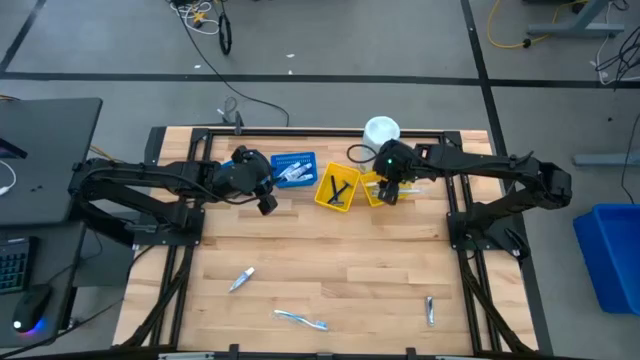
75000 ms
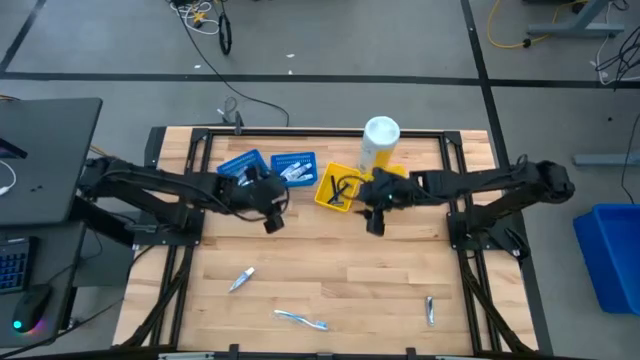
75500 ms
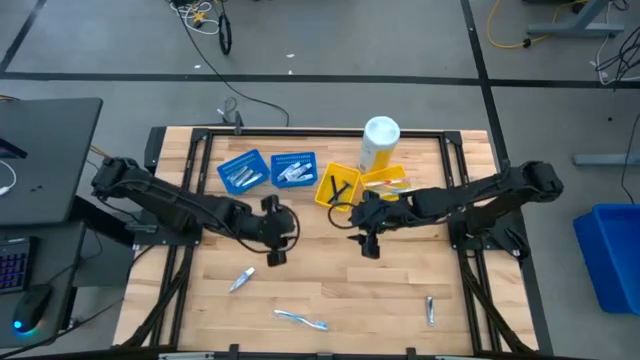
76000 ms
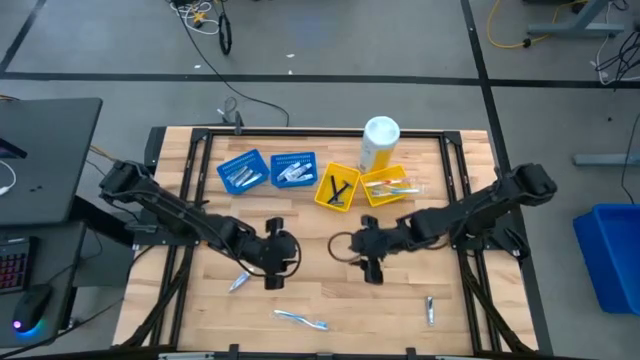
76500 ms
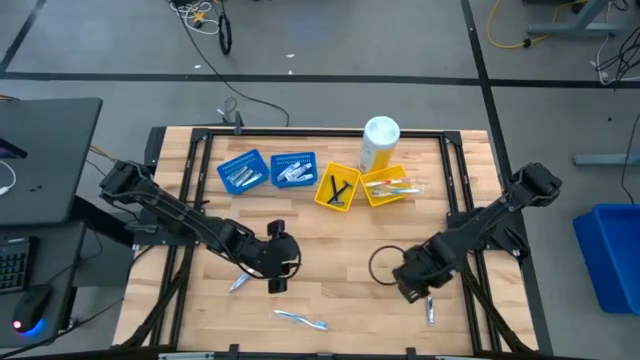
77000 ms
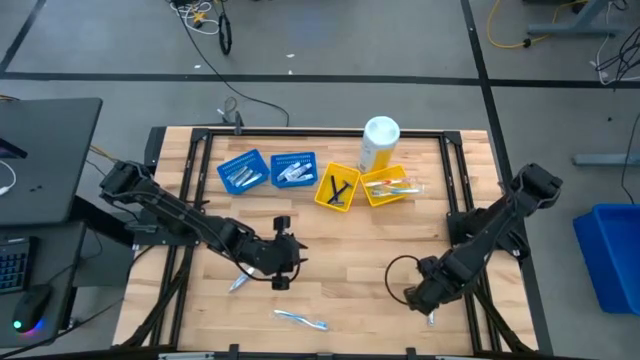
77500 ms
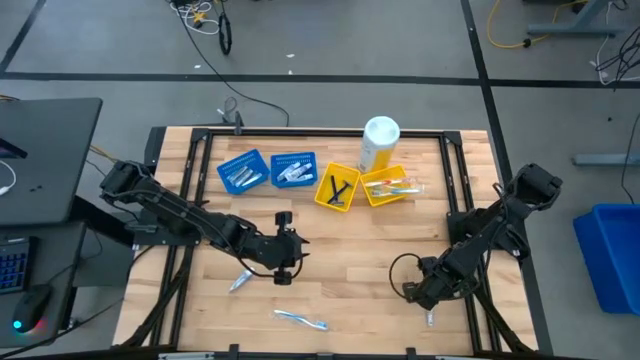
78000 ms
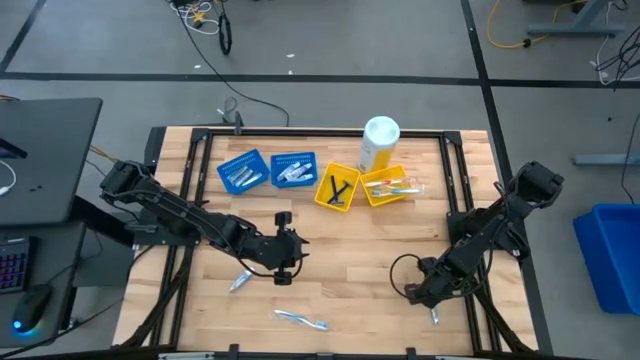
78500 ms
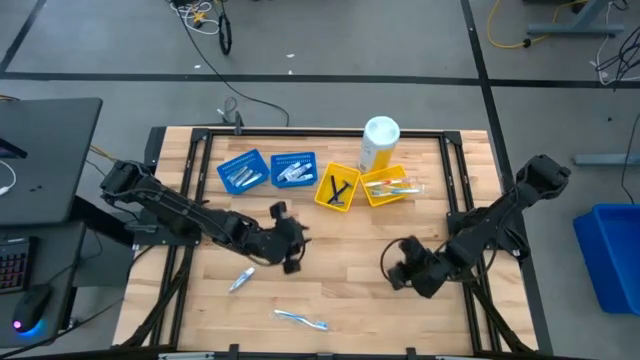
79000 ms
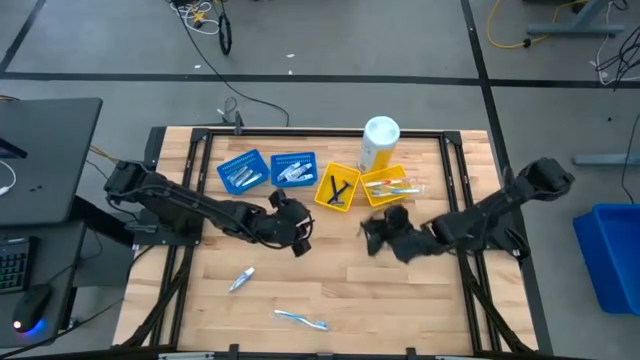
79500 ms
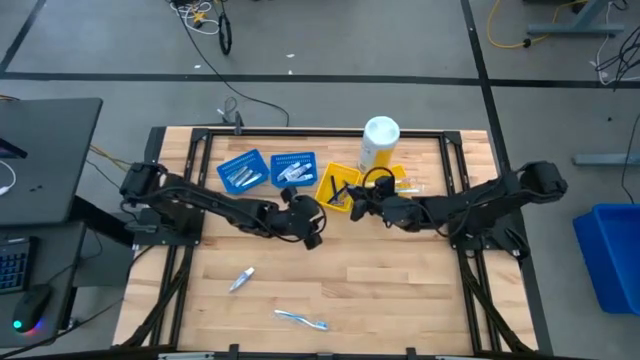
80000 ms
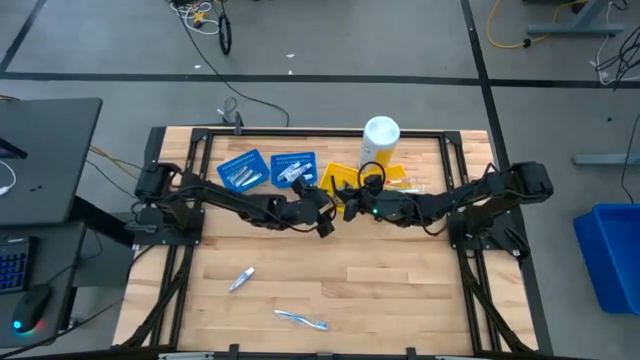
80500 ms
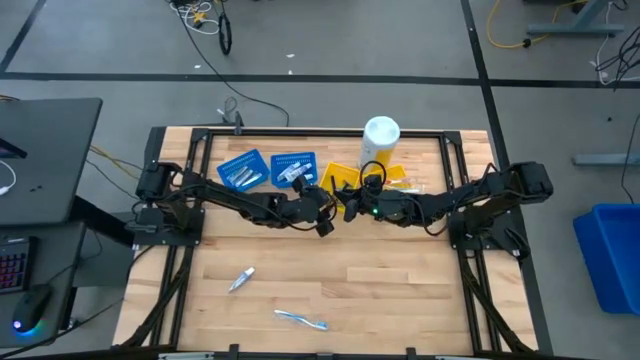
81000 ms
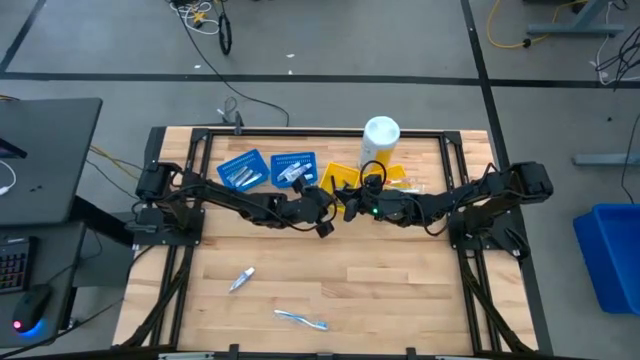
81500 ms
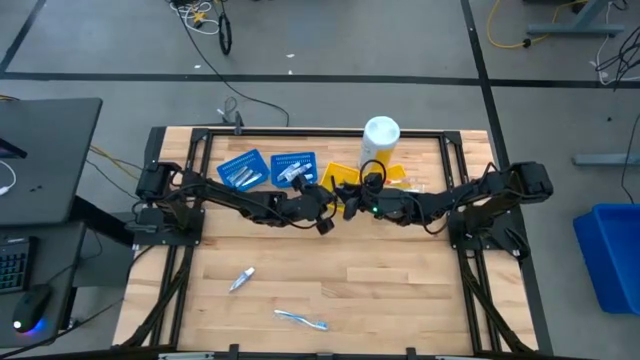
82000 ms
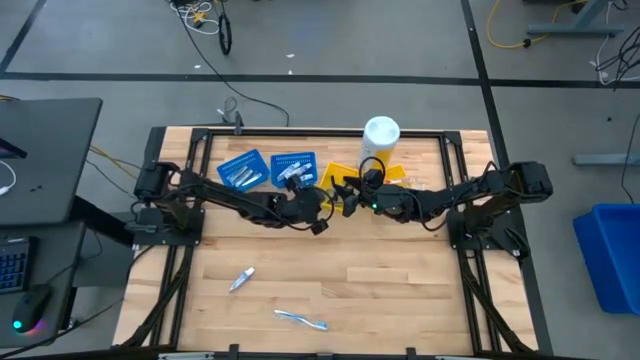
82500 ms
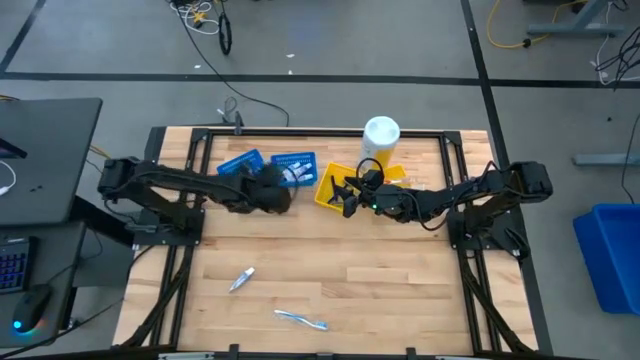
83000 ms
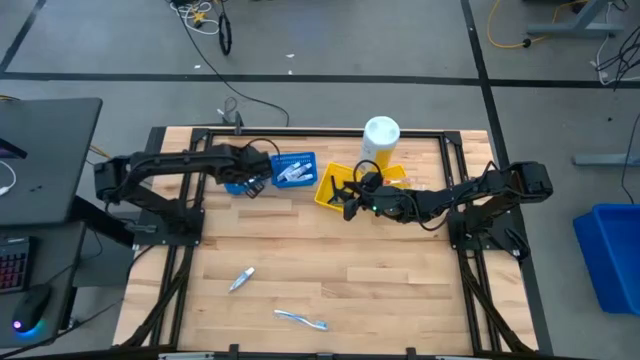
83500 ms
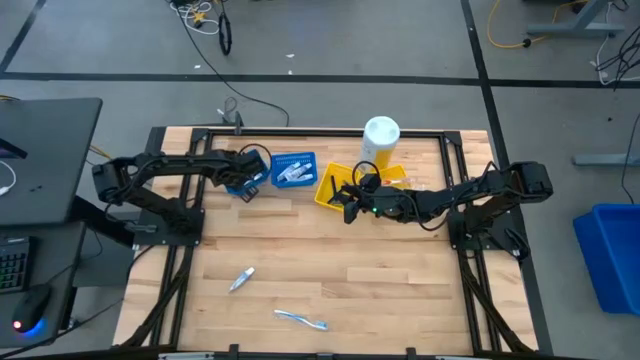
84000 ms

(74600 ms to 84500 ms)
Task: Pick & Place Travel size toiletries
Put the silver nail cutter into the left blue bin

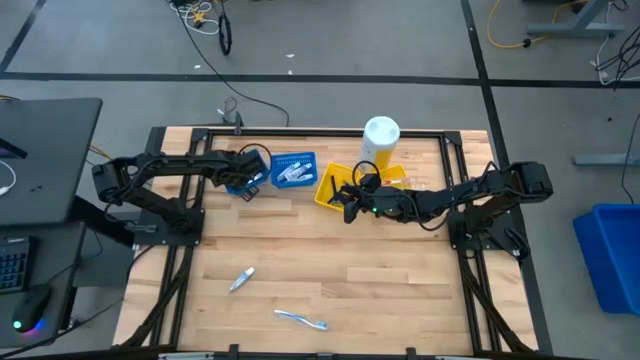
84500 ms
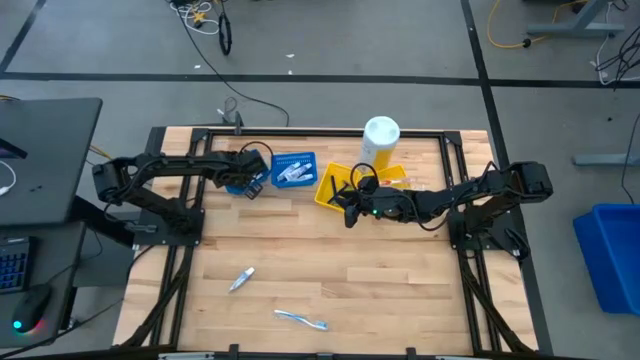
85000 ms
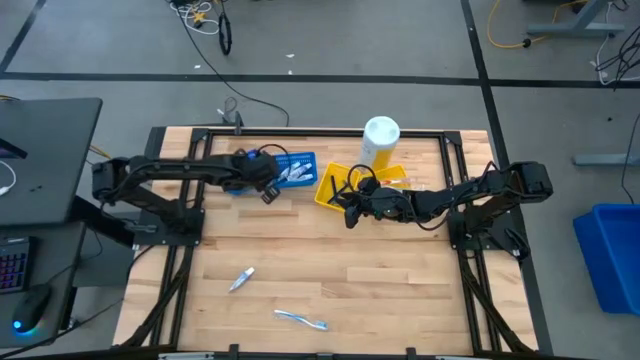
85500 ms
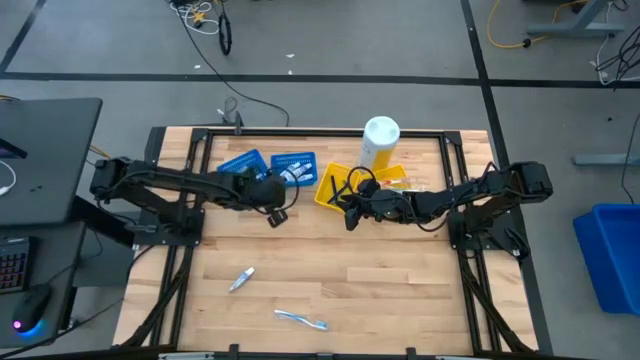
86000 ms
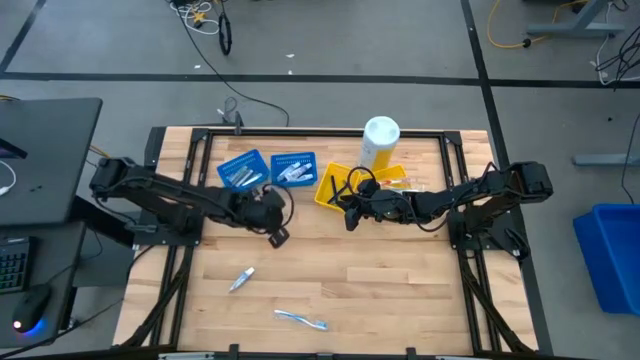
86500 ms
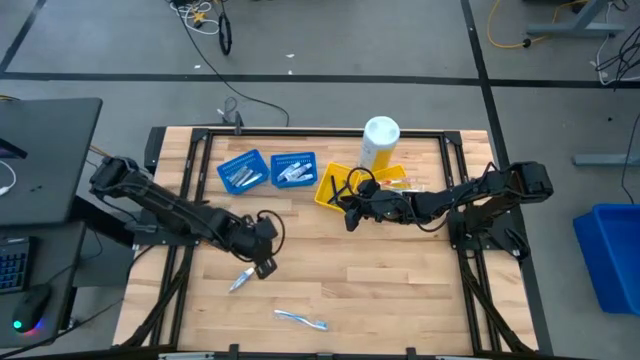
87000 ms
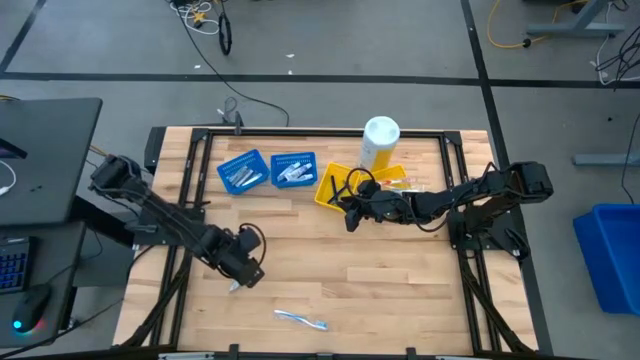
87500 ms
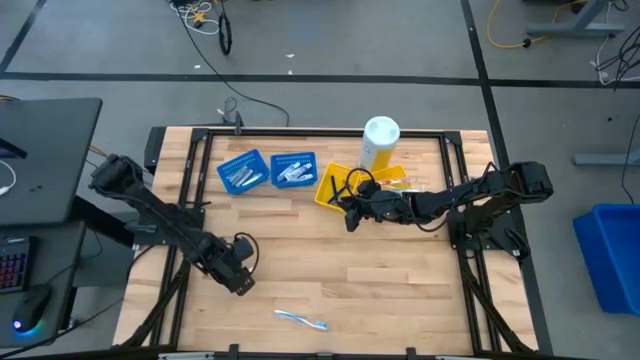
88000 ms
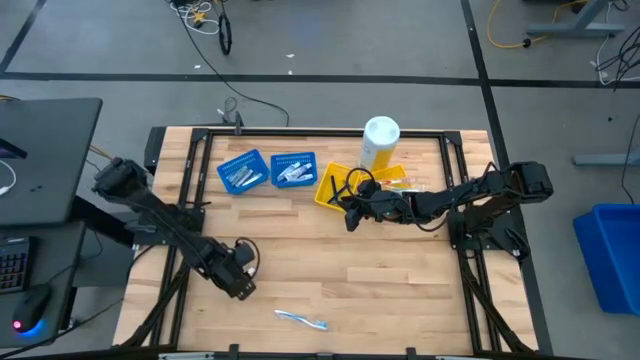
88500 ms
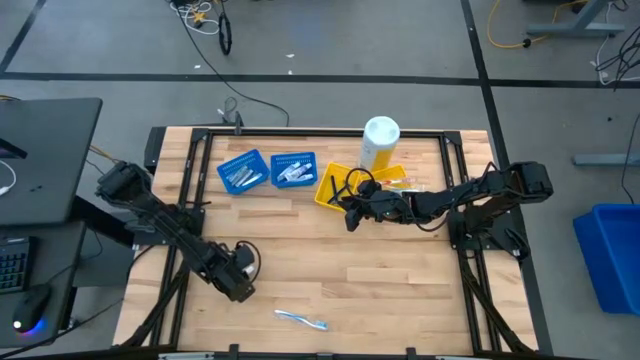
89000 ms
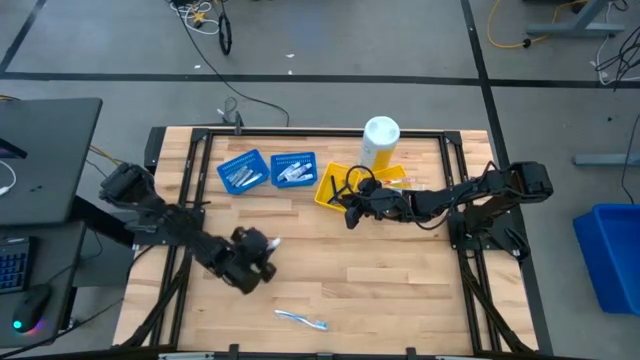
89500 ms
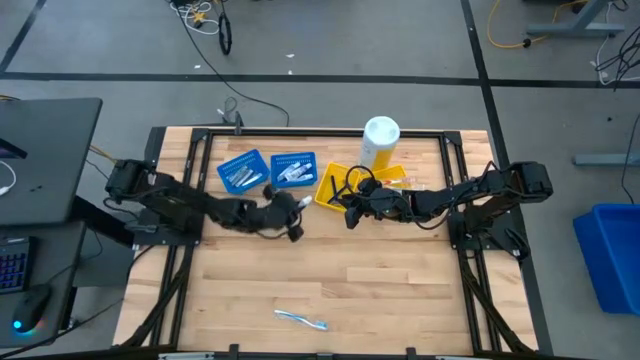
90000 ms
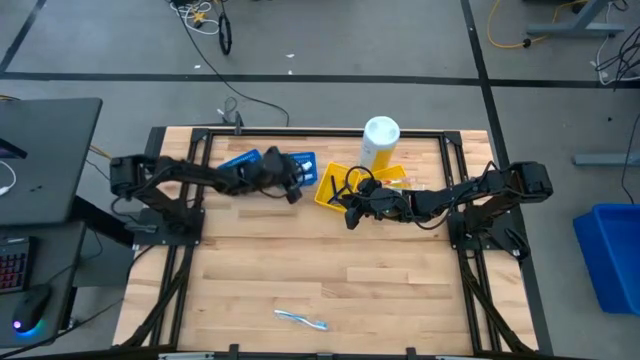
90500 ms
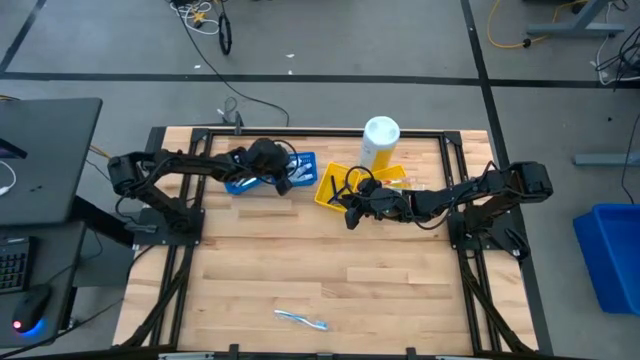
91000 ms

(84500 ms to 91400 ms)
Put the white toothpaste into the right blue bin

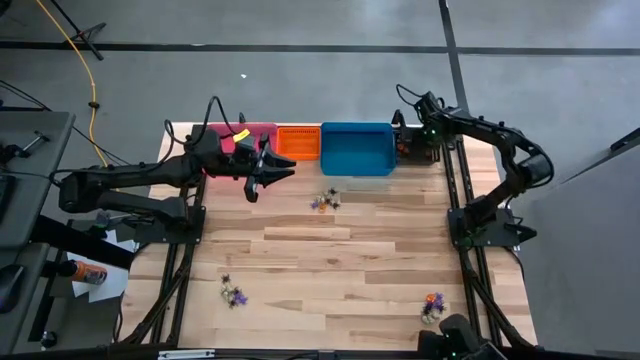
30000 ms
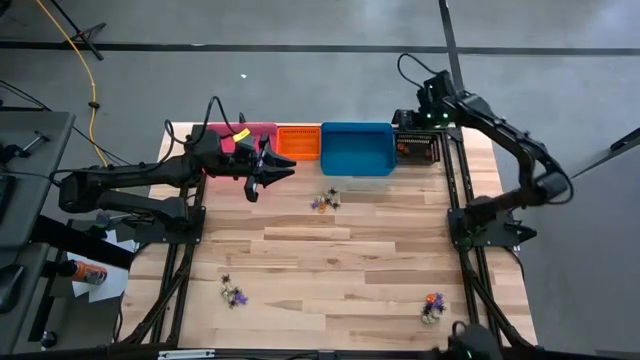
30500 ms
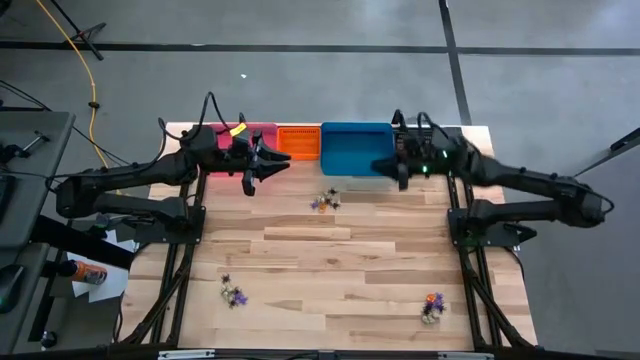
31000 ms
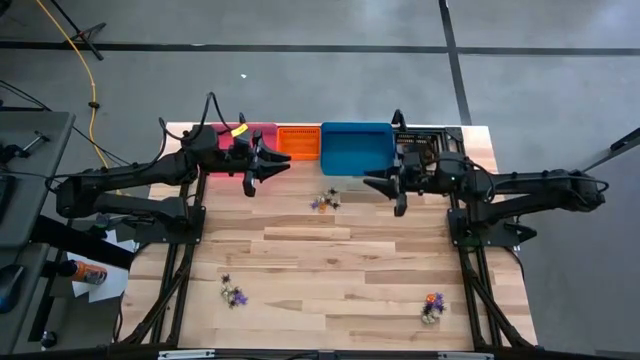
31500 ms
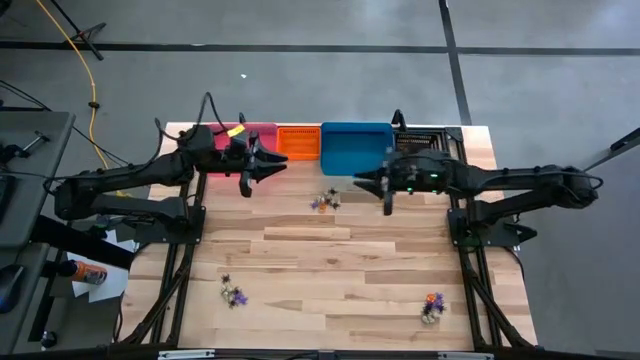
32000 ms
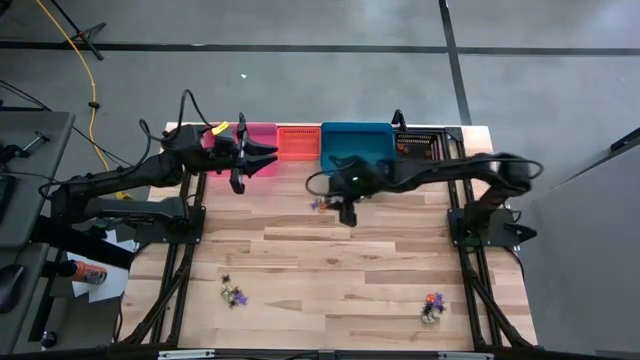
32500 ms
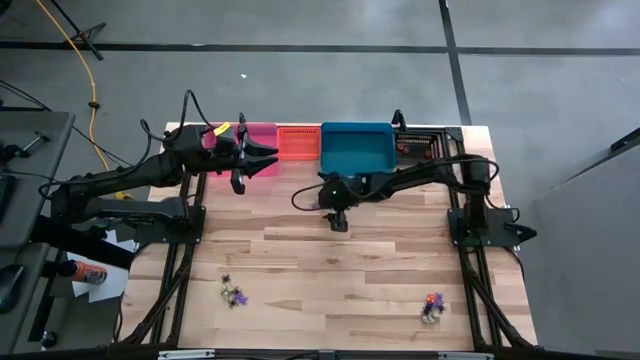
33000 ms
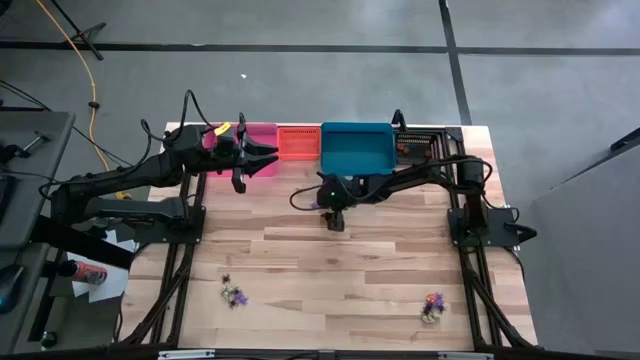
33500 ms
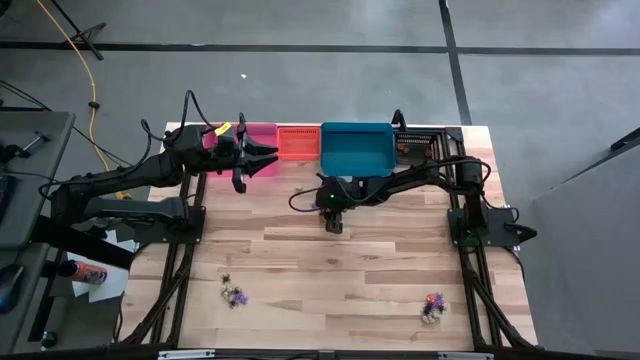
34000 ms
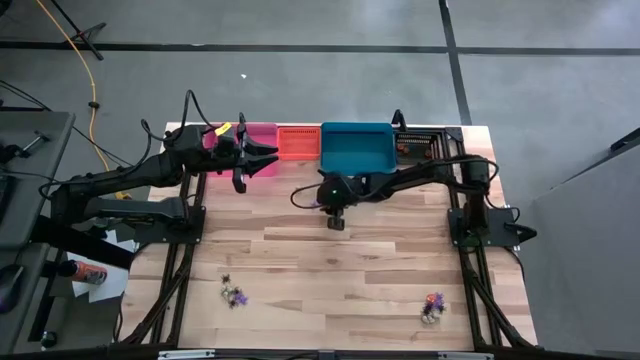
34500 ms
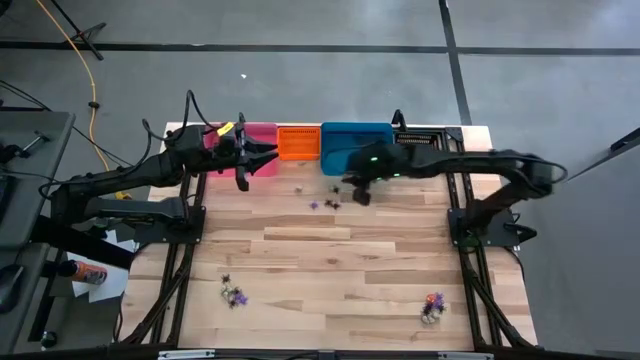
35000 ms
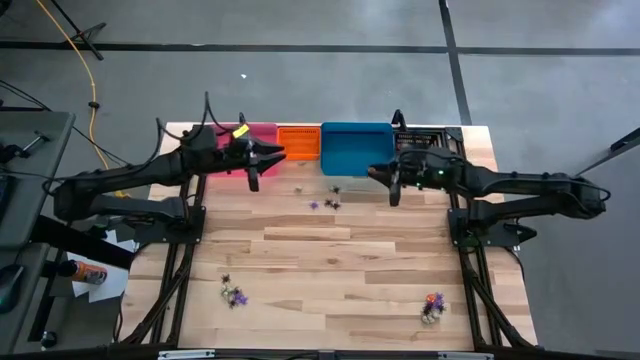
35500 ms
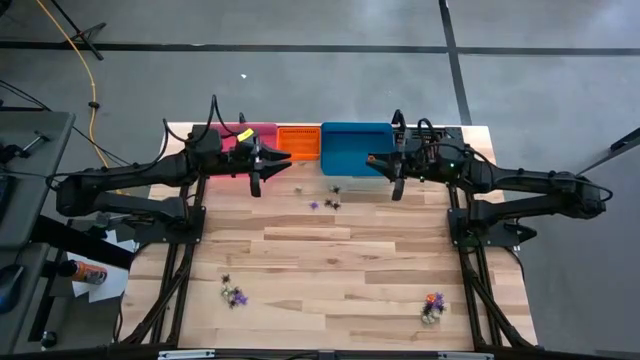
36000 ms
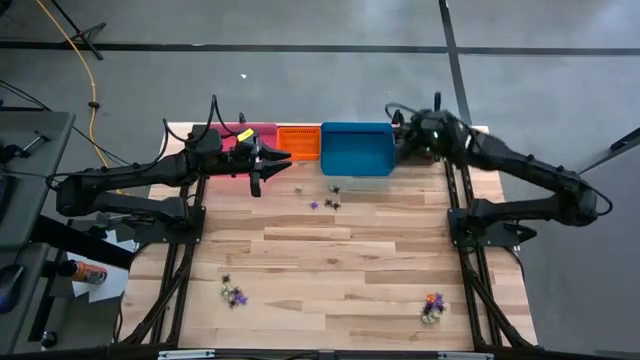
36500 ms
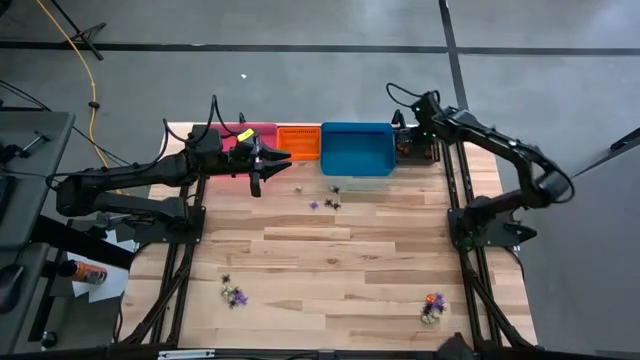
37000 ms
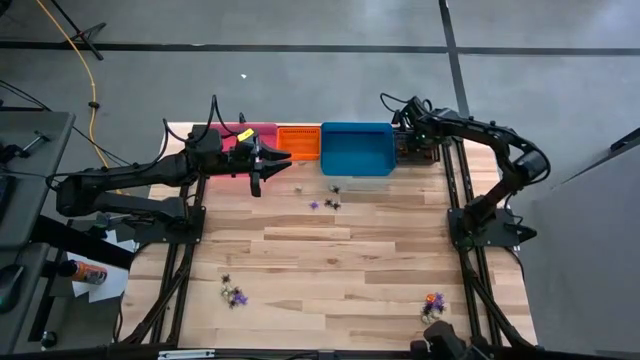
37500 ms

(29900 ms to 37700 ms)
Task: Sort Halloween decoration
Put the orange pumpkin toy into the black bin
